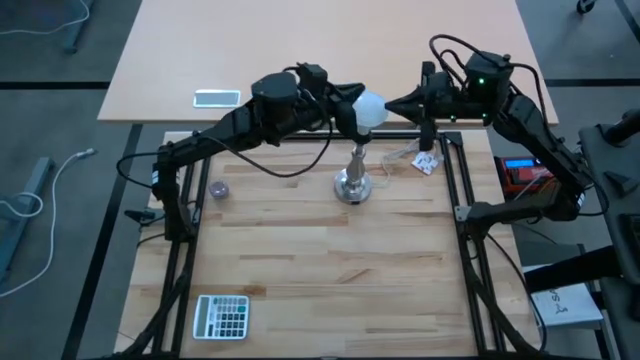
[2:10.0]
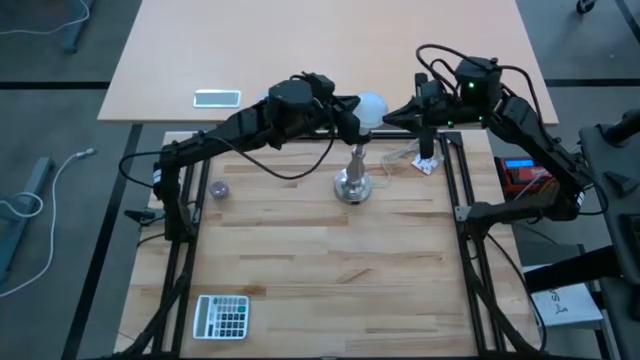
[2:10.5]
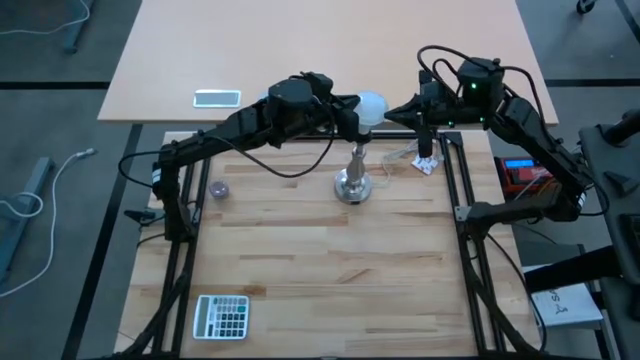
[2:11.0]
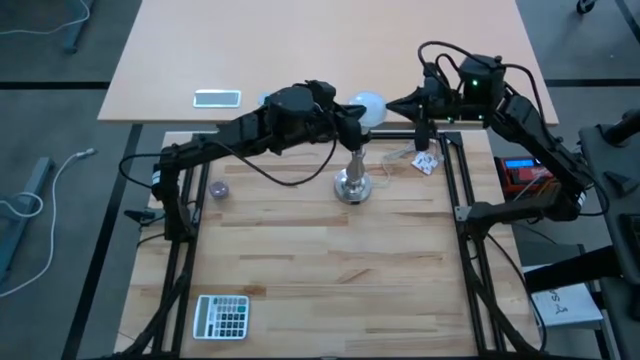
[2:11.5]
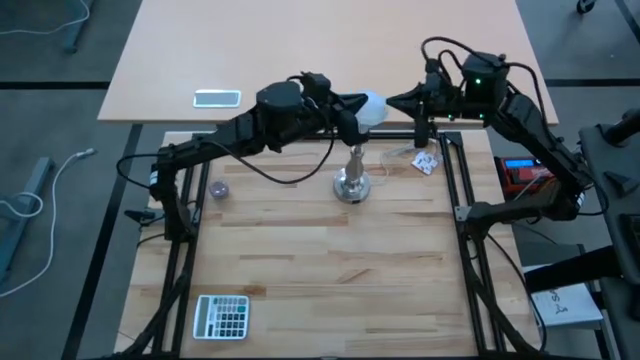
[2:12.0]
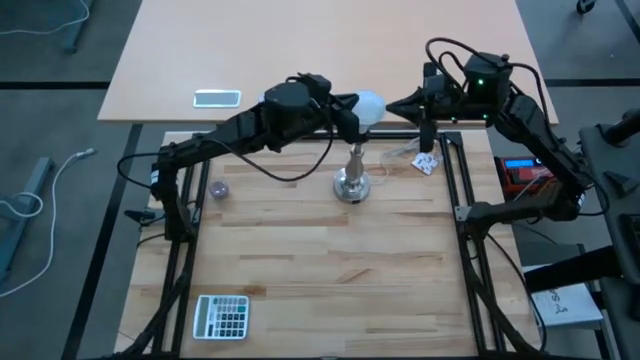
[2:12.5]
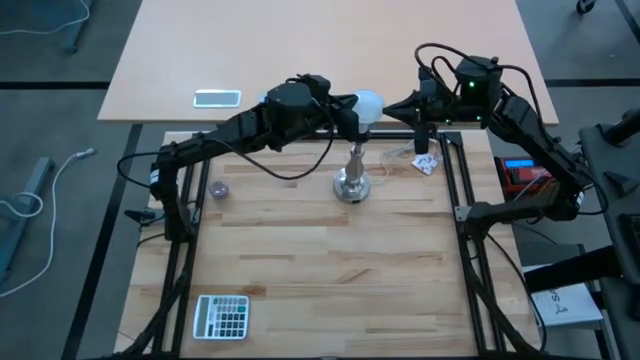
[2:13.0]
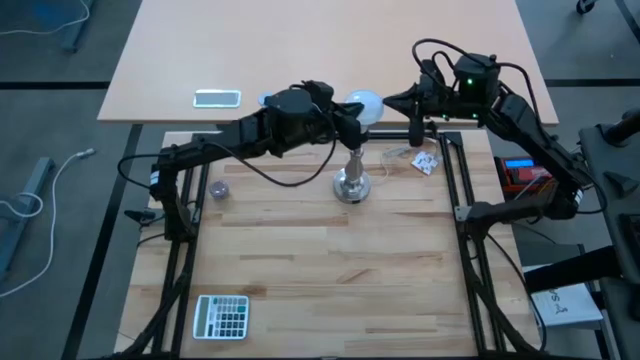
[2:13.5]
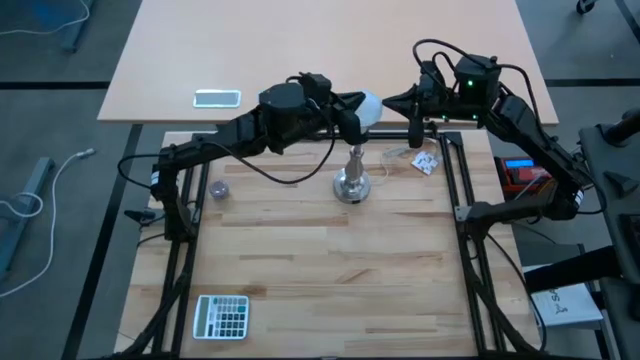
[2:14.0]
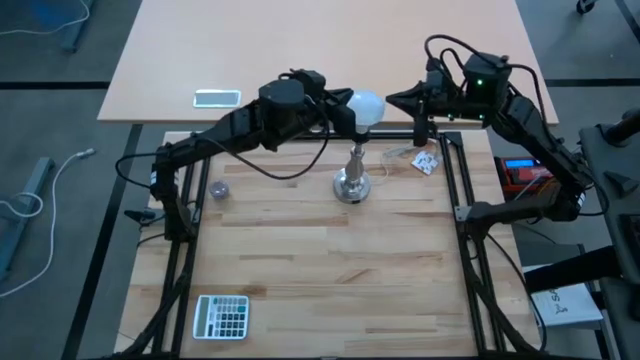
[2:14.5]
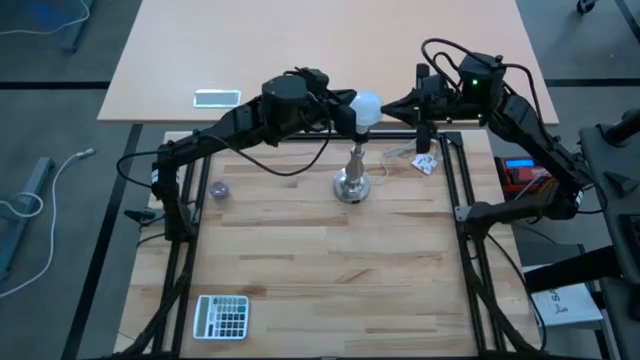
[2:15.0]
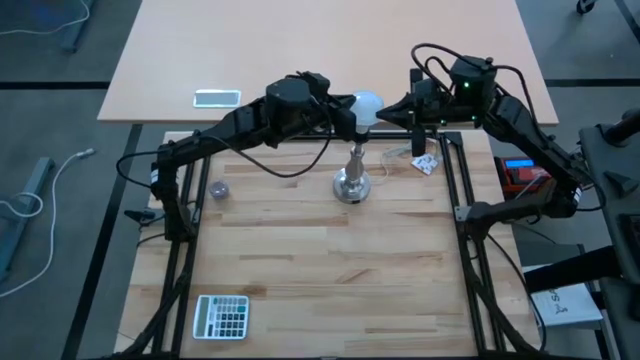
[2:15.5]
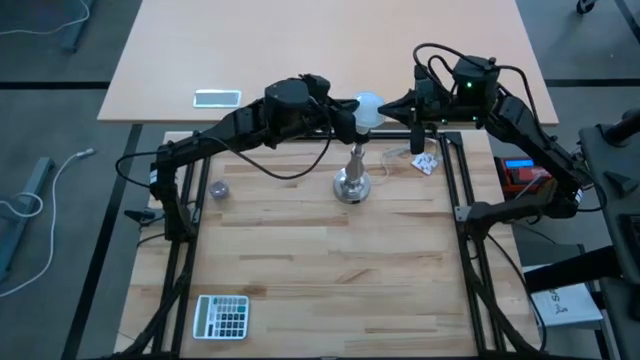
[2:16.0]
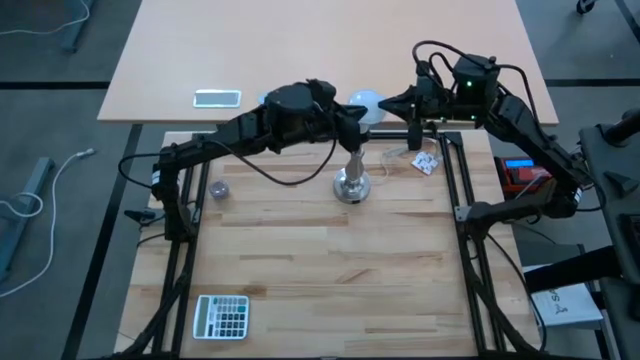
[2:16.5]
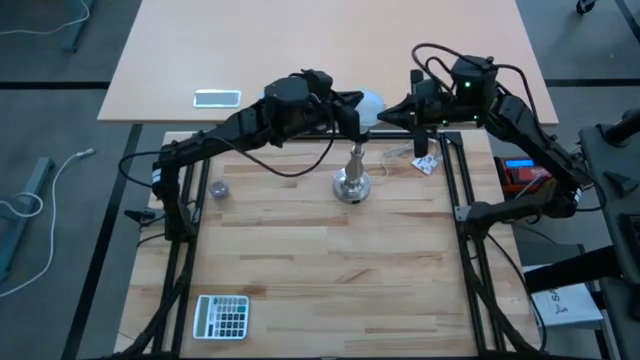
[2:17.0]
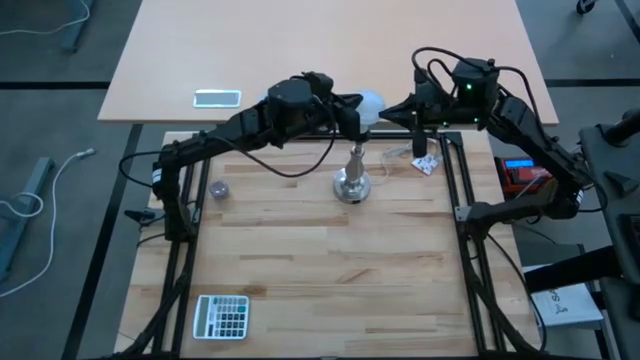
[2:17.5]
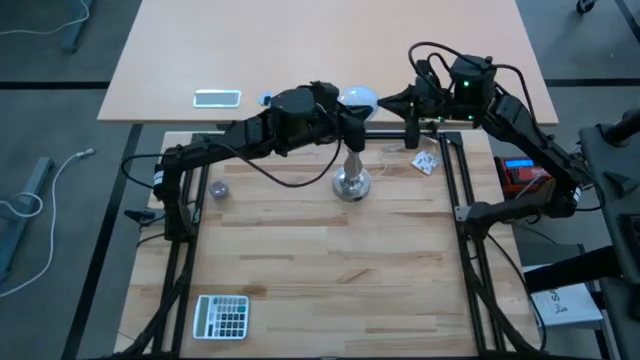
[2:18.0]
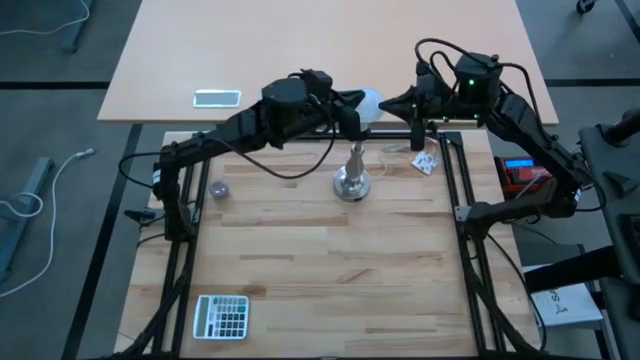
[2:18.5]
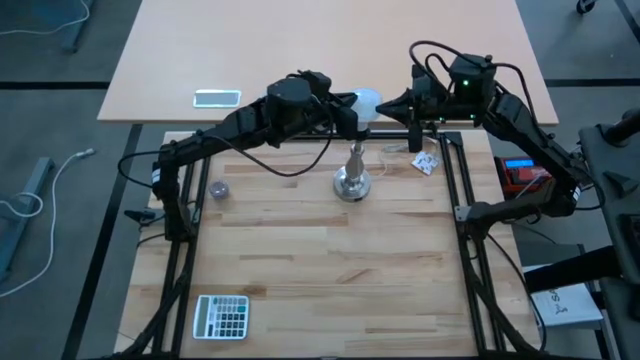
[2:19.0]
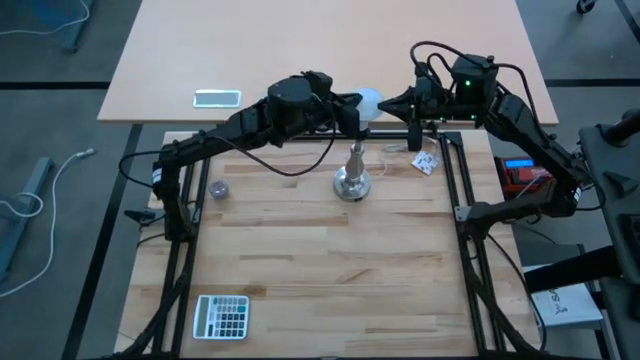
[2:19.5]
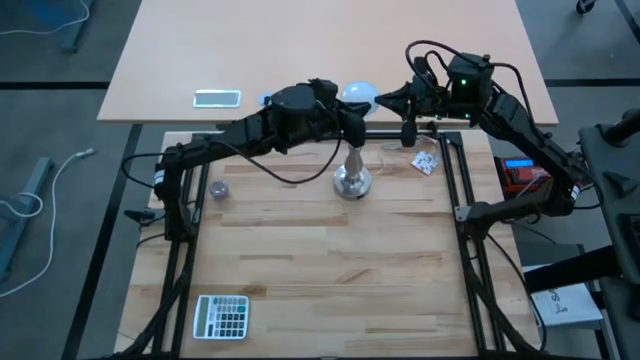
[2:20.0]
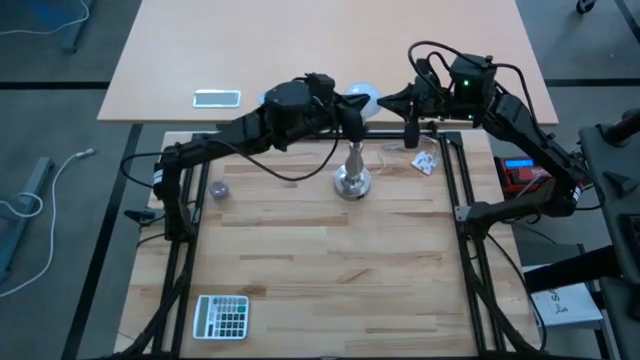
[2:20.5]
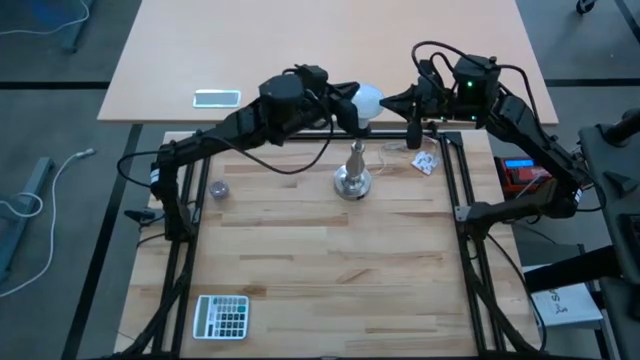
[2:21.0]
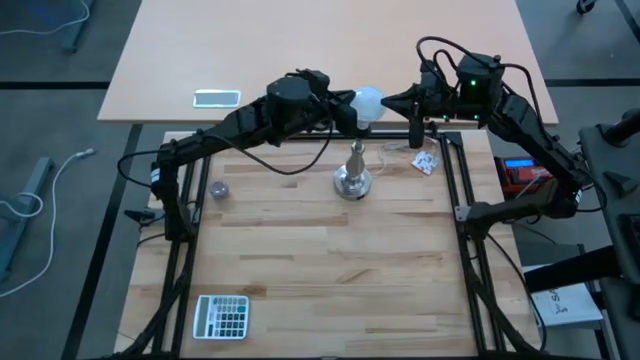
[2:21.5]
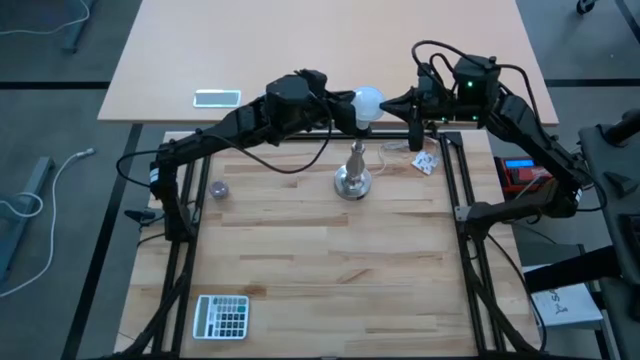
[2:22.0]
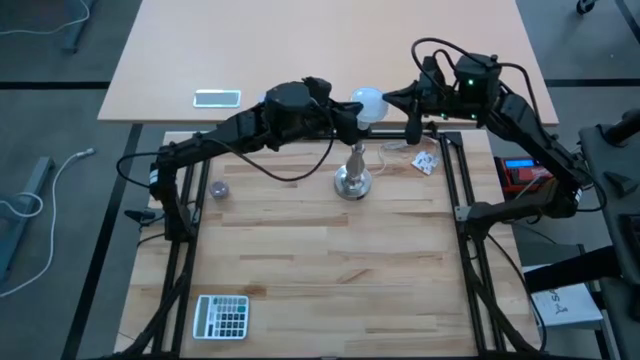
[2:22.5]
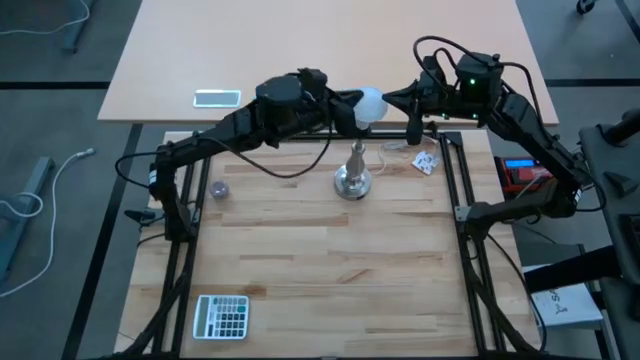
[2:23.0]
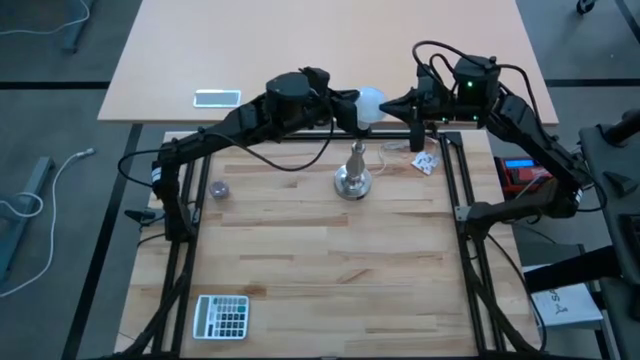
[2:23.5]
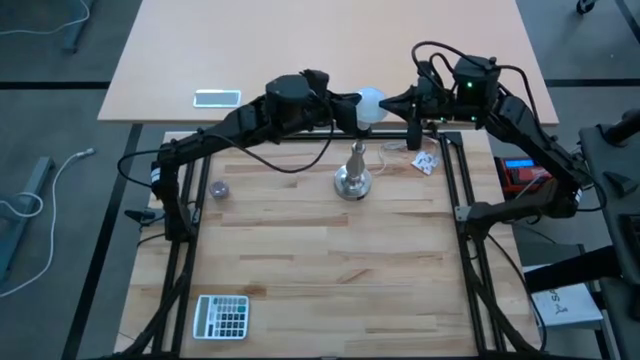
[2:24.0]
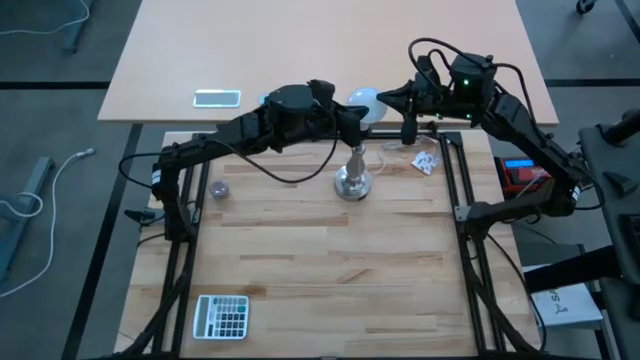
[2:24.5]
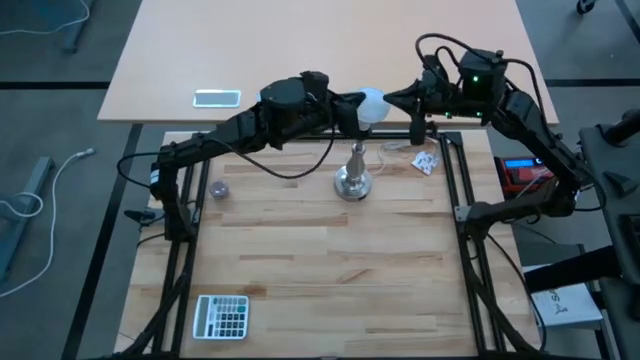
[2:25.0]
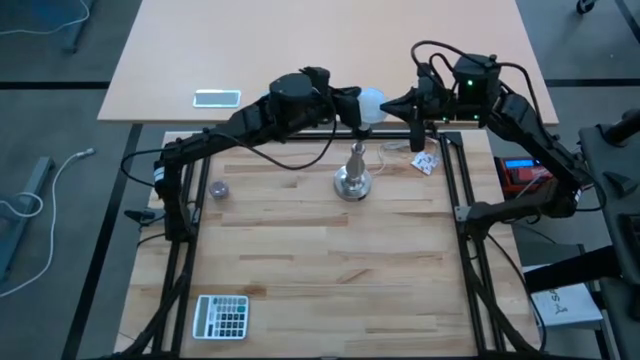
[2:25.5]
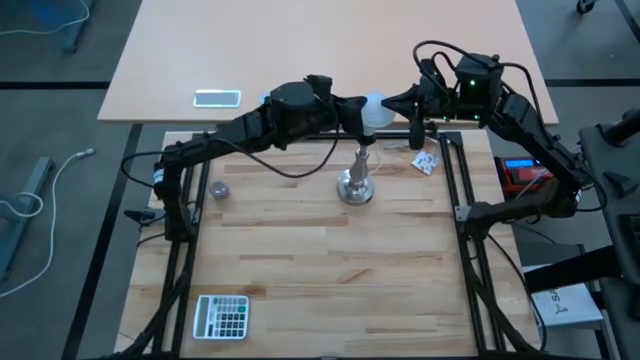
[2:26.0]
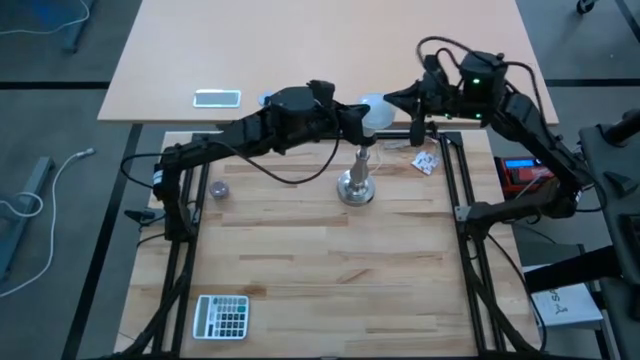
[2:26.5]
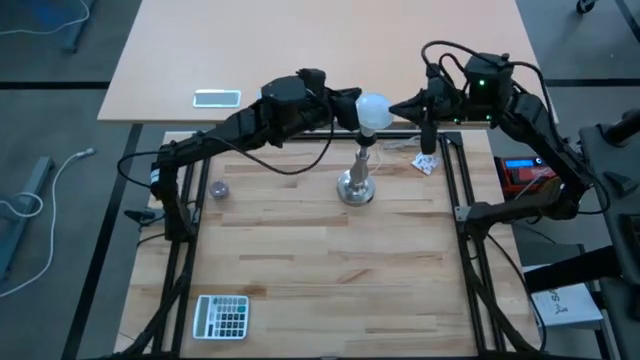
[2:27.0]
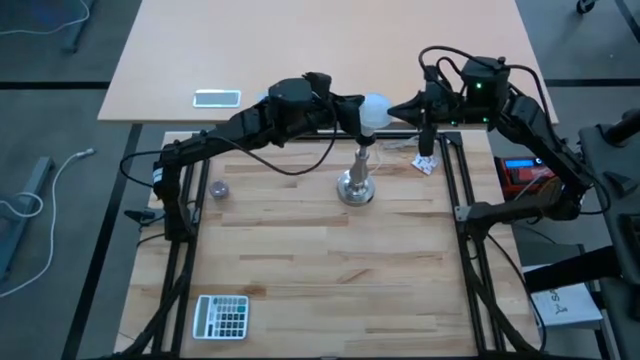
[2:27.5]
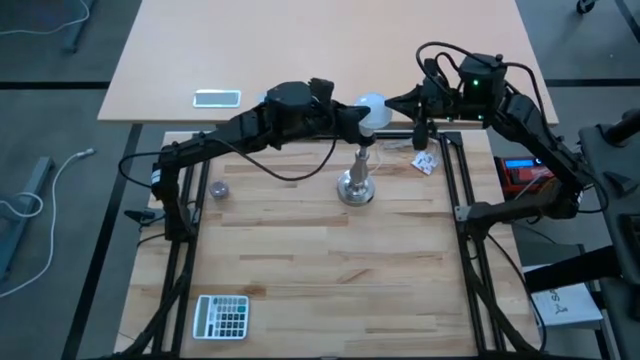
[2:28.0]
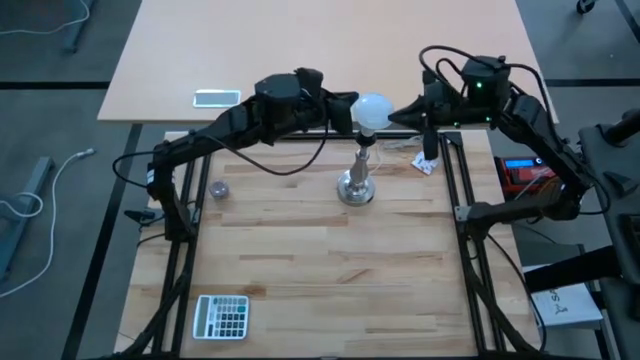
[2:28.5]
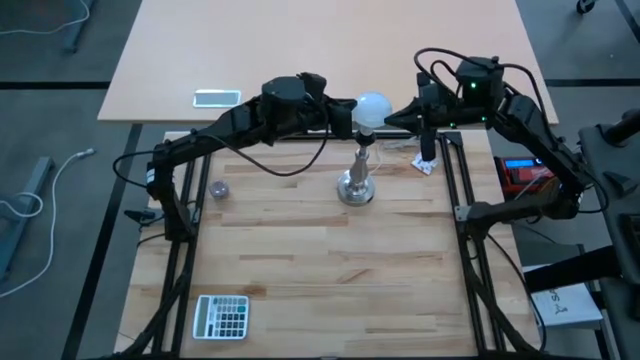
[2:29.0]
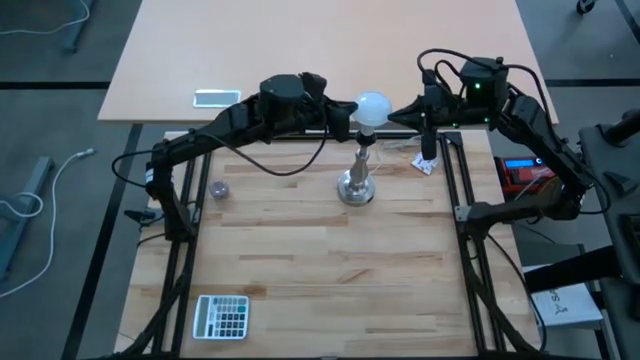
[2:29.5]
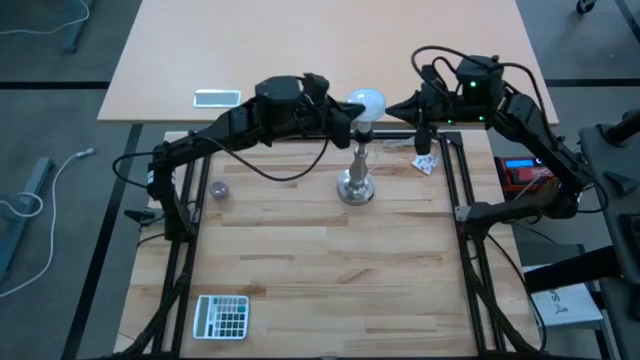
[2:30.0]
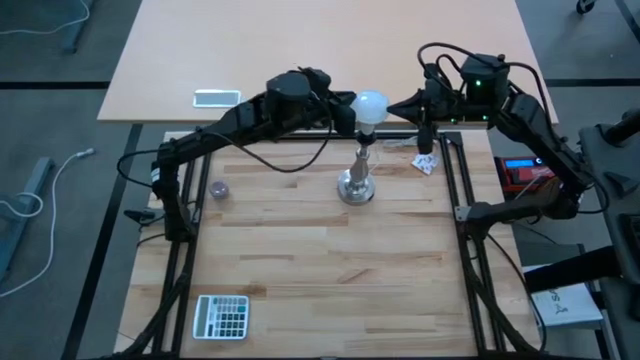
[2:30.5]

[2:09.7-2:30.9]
Task: Screw lightbulb
Remove the lightbulb from the lamp
